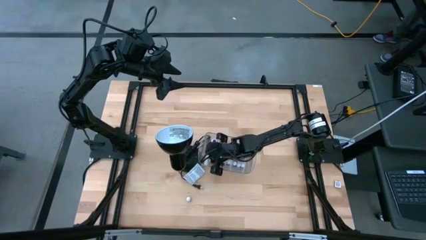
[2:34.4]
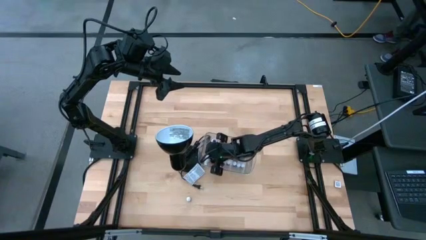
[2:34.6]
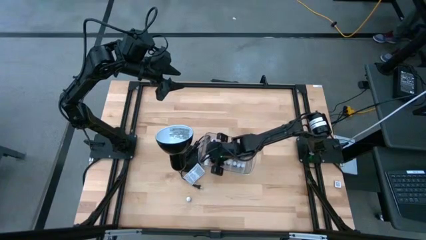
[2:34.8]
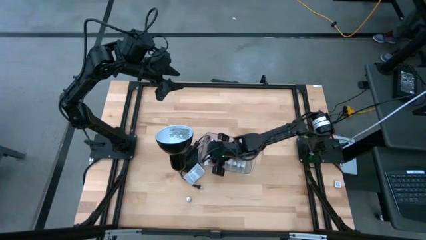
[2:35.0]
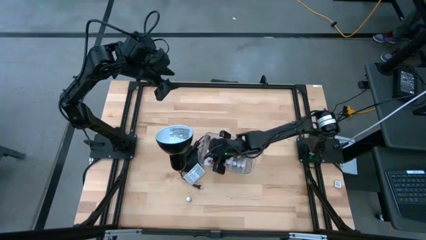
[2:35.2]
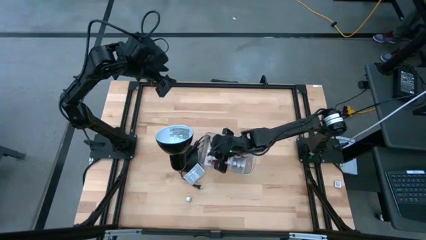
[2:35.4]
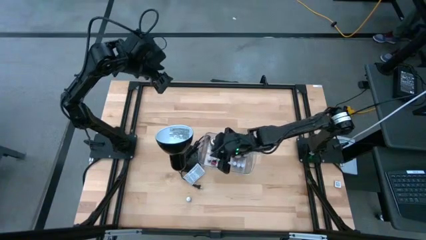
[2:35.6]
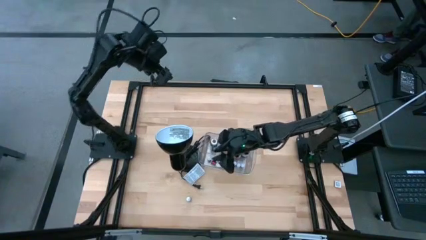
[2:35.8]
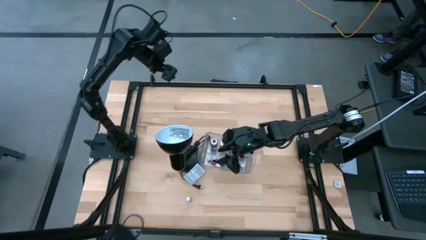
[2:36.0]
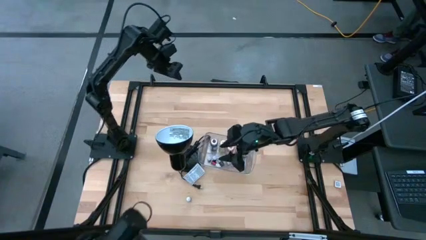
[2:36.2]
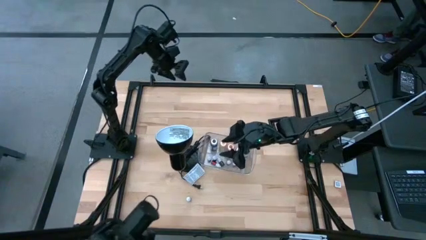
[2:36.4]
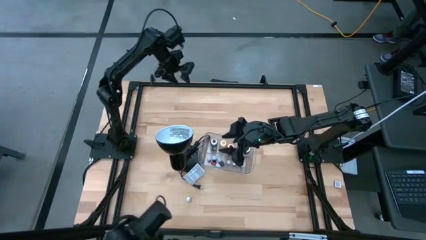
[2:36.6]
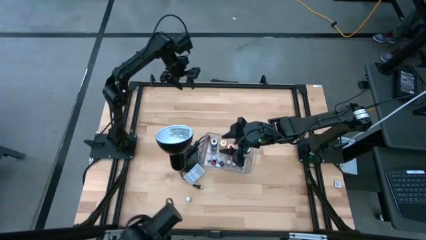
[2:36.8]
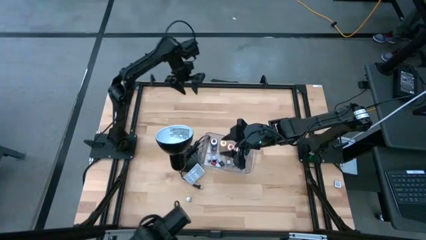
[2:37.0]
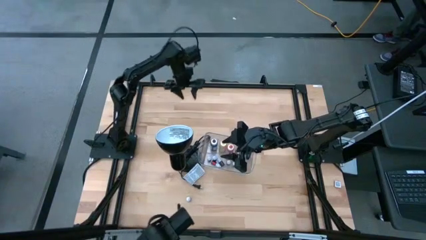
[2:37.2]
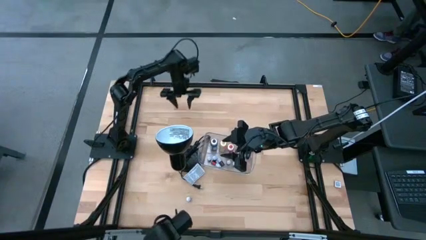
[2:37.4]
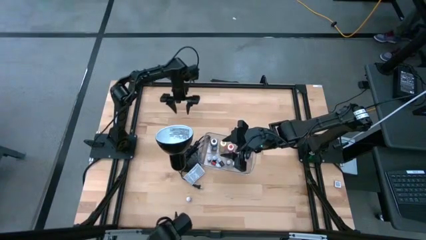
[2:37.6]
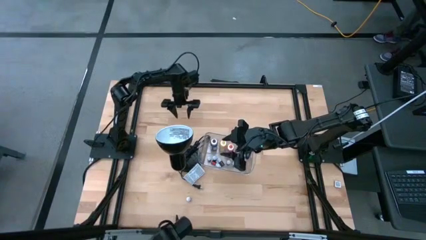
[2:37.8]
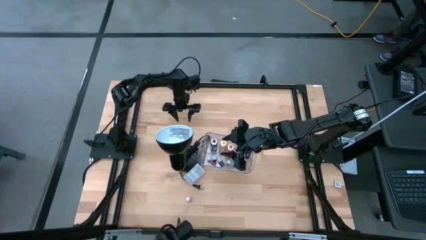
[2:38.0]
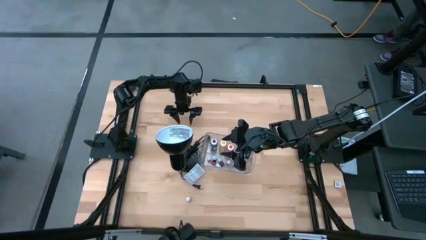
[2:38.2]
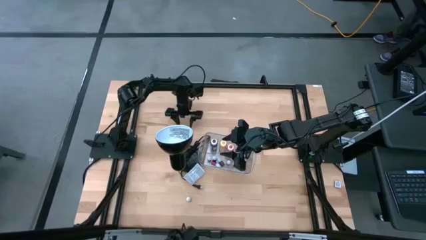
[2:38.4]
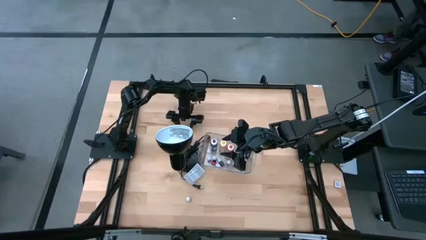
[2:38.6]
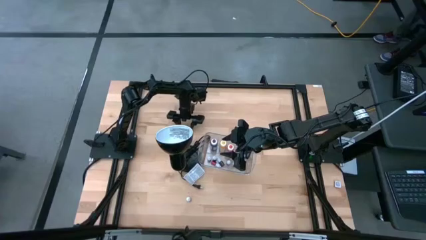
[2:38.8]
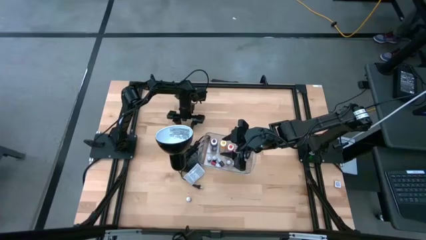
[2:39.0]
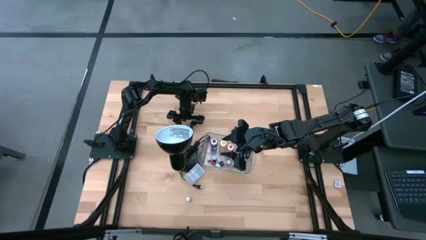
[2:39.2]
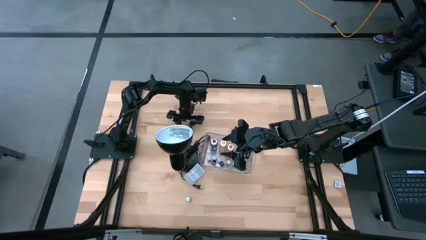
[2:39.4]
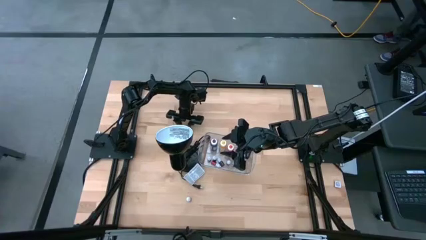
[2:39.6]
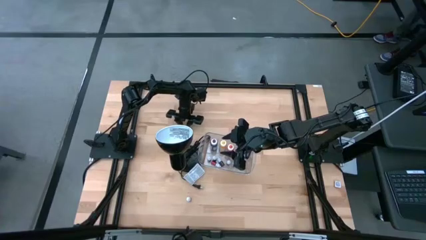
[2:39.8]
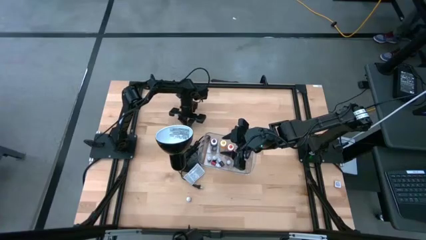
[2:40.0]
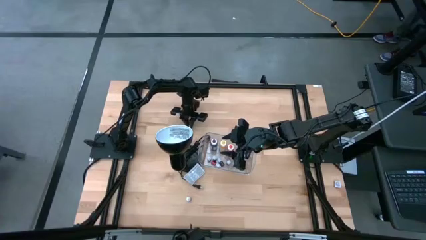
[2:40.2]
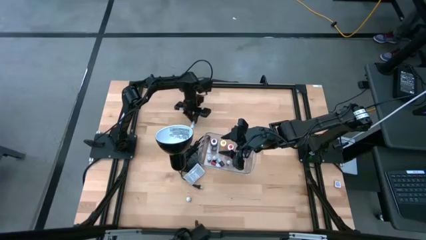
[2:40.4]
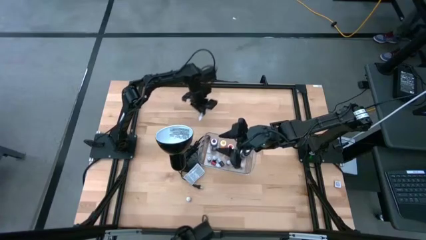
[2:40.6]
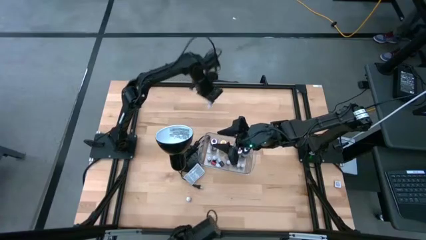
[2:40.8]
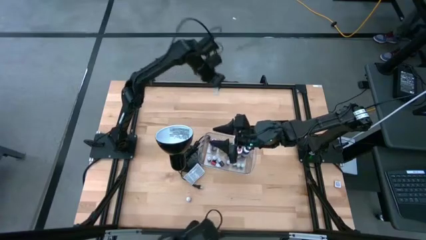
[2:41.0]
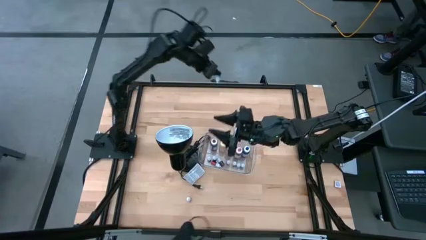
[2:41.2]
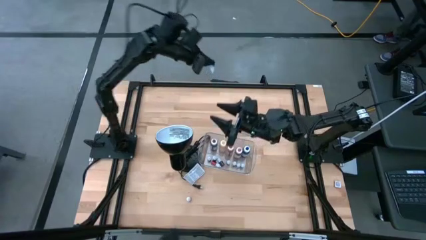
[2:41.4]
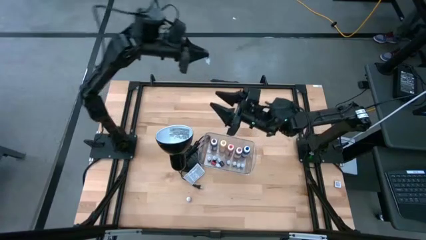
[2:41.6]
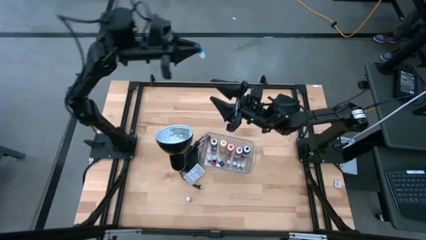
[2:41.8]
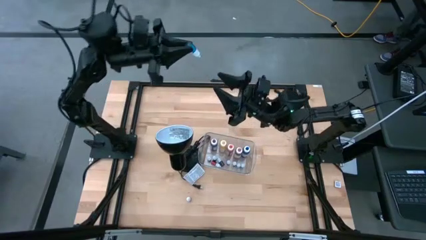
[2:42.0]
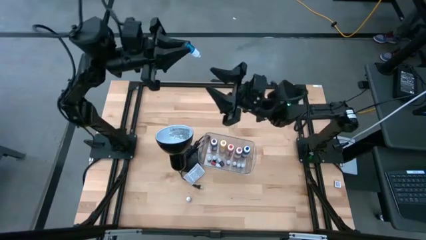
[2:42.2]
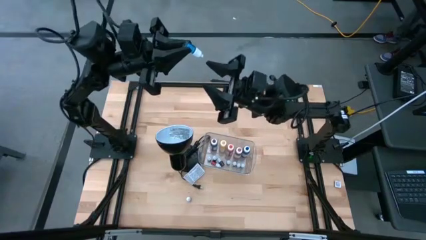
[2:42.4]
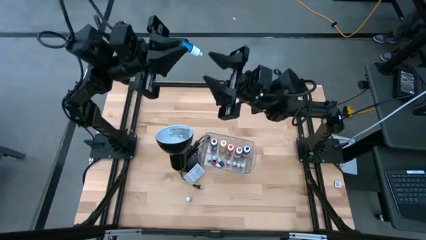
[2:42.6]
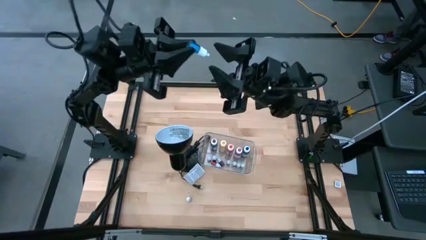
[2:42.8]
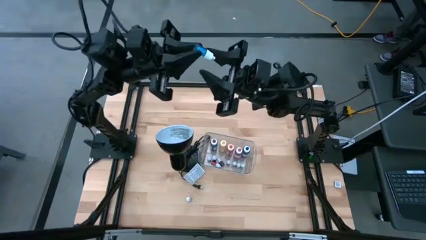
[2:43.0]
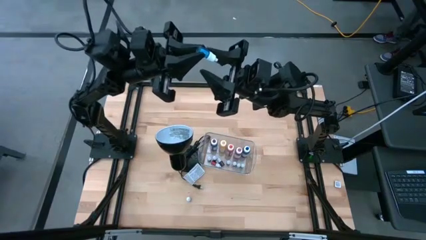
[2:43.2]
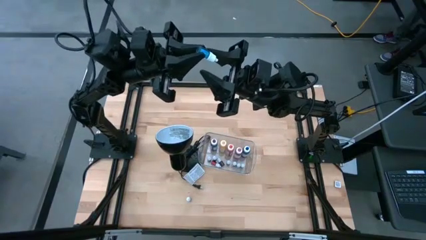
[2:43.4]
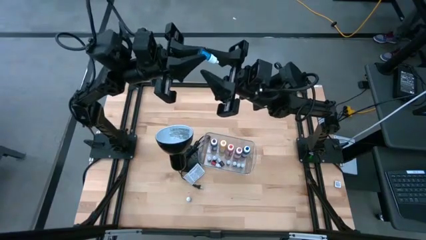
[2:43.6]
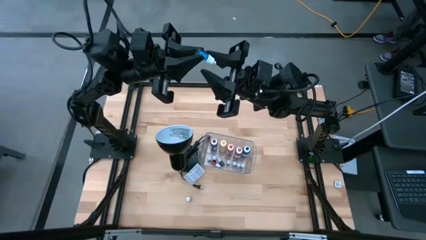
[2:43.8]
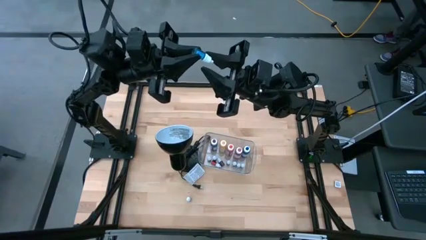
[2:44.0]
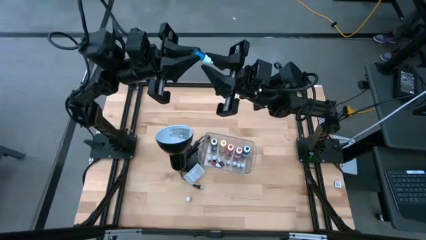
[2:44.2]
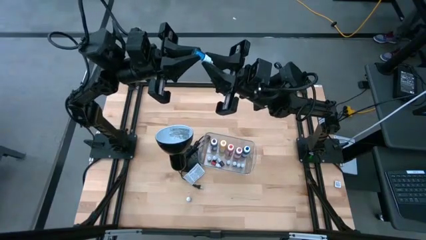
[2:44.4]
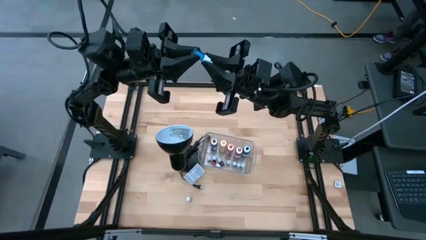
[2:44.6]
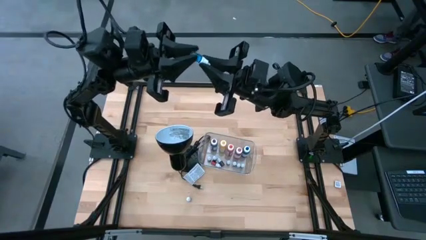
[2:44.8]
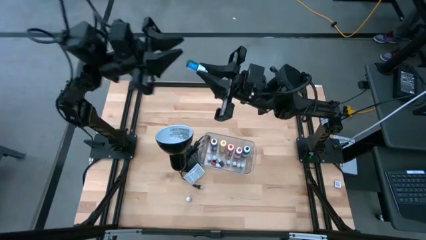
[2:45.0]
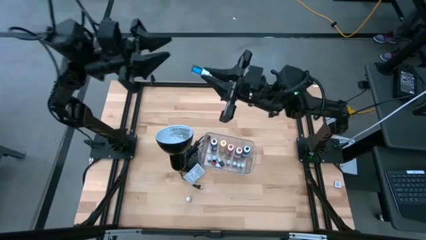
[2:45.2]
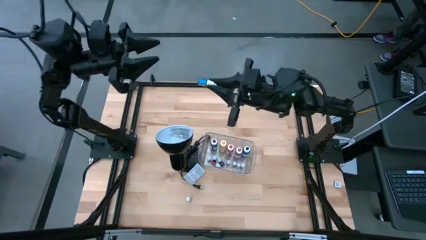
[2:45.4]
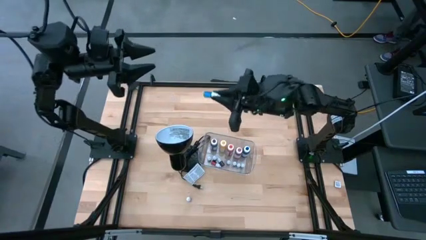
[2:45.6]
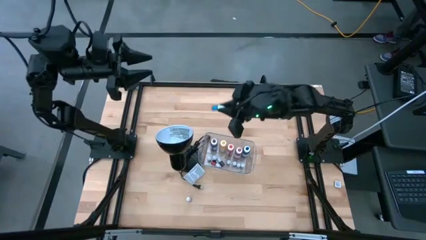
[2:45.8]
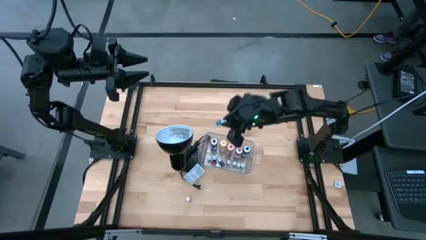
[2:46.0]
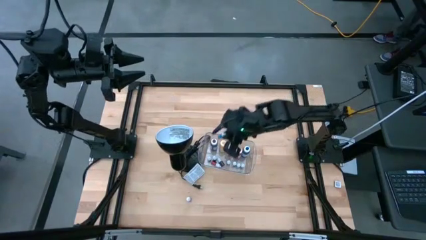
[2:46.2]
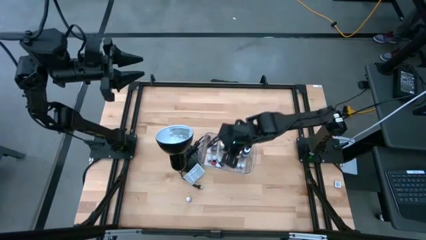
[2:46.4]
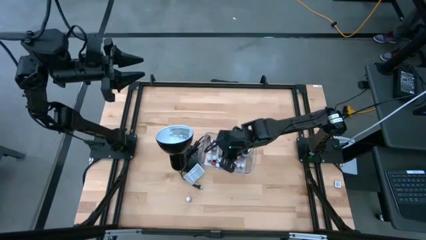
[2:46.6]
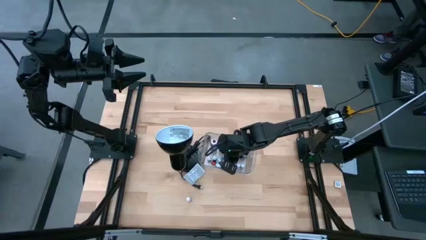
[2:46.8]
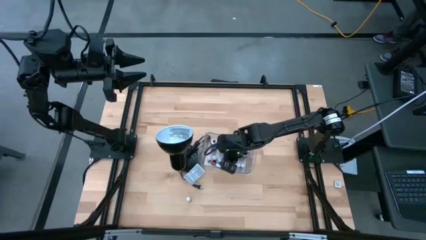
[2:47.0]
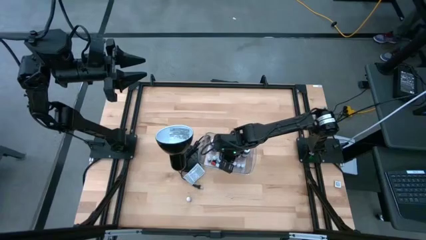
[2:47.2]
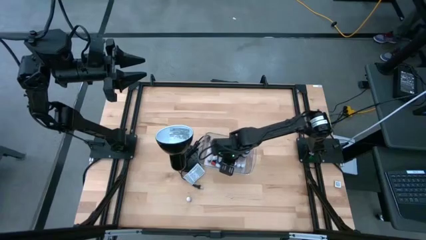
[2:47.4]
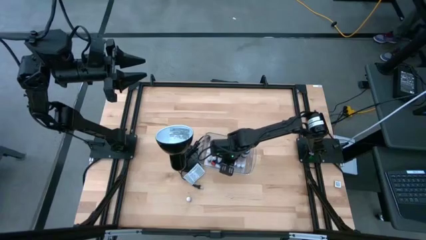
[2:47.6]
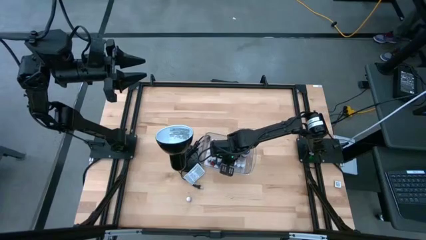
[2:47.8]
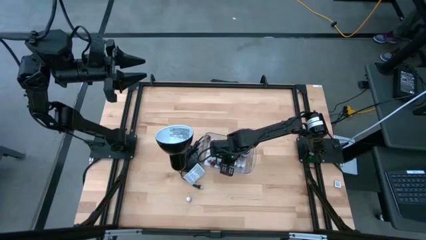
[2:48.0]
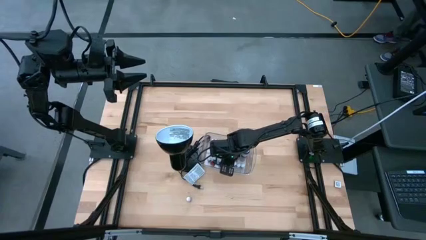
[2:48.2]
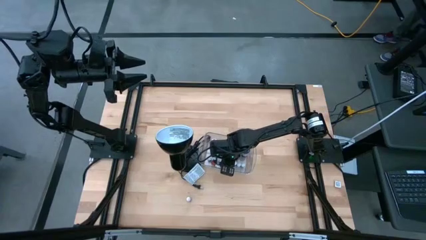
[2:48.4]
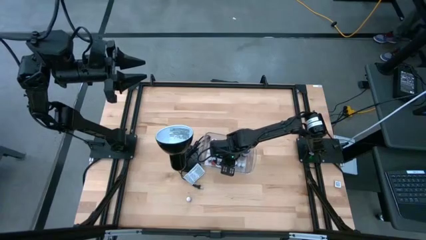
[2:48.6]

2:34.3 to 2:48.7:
Task: Pick & Place food coloring
Put the small blue food coloring bottle into the transparent bin
